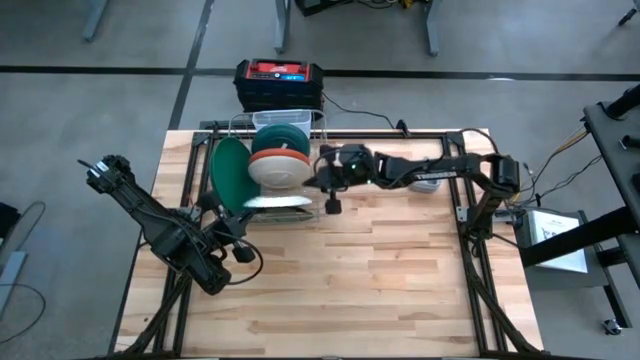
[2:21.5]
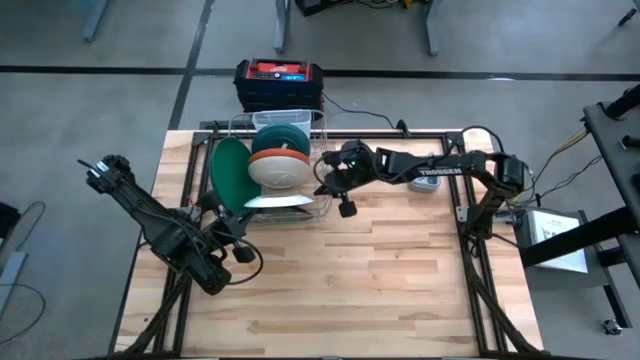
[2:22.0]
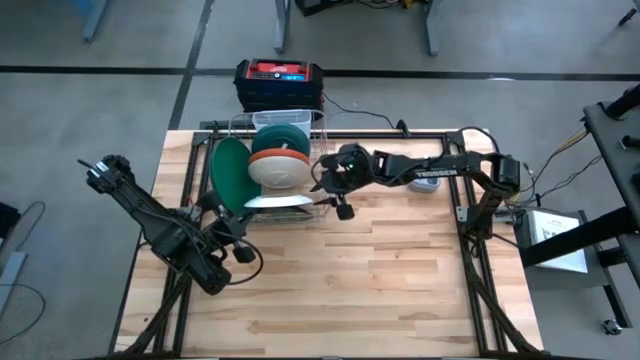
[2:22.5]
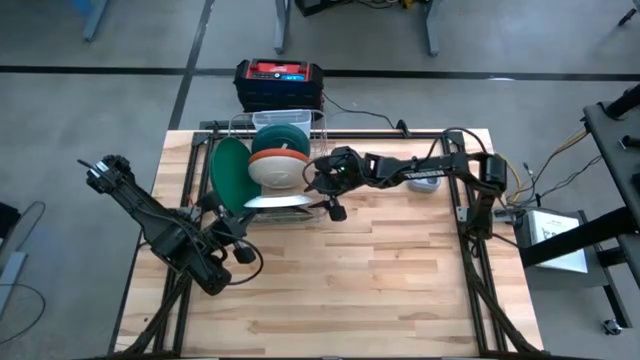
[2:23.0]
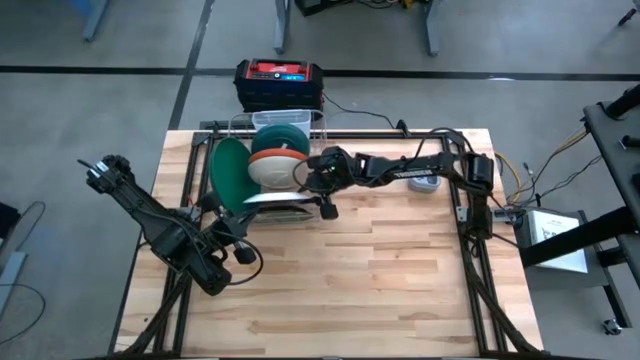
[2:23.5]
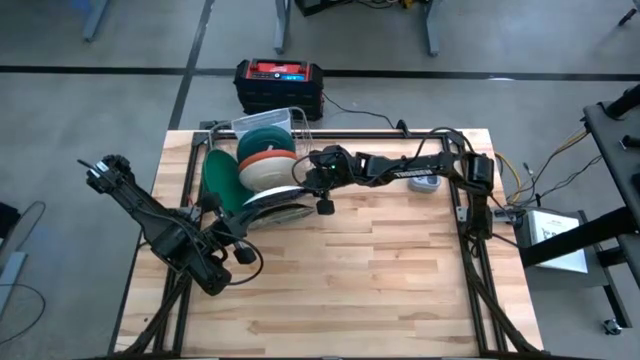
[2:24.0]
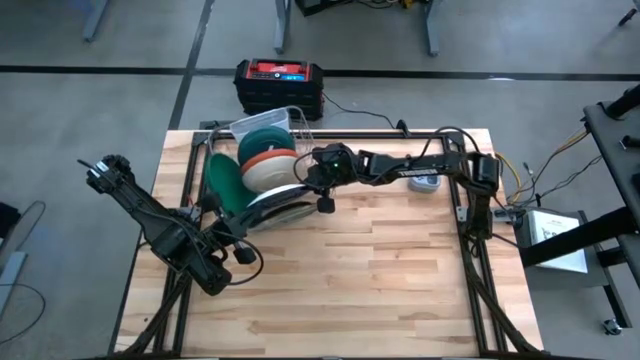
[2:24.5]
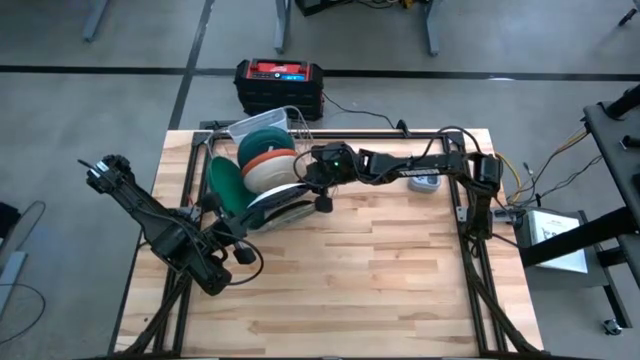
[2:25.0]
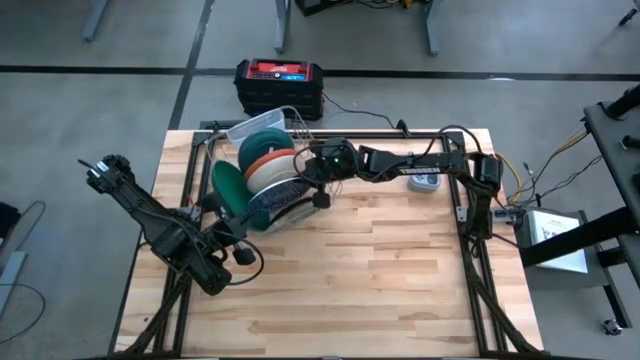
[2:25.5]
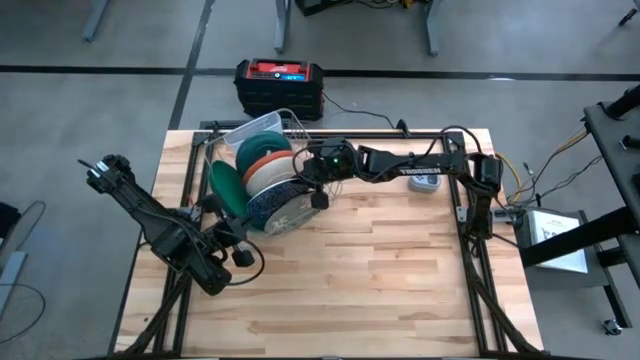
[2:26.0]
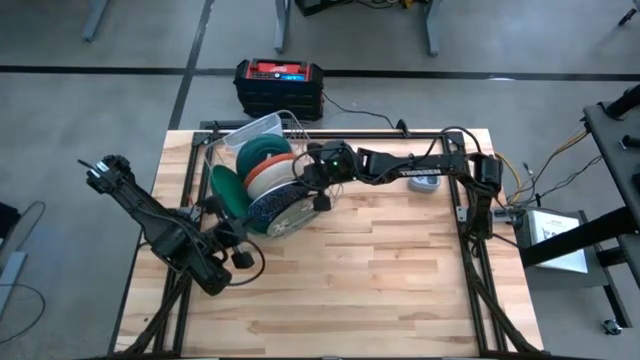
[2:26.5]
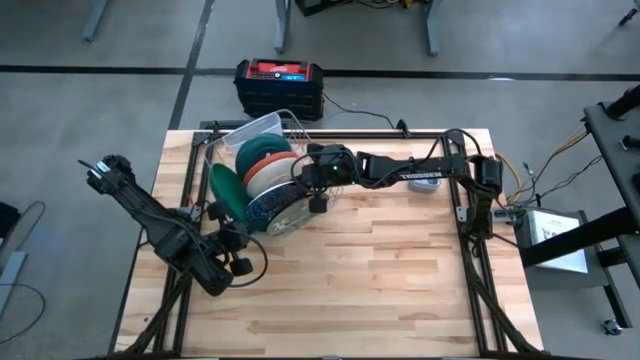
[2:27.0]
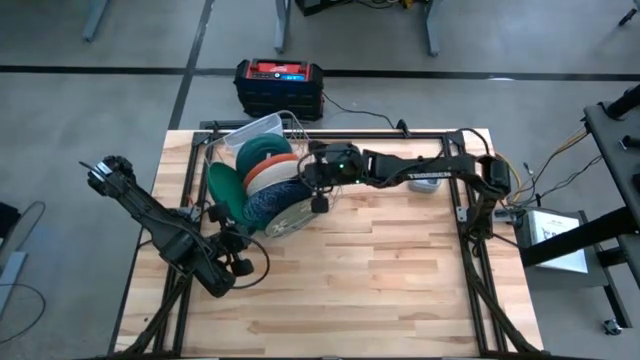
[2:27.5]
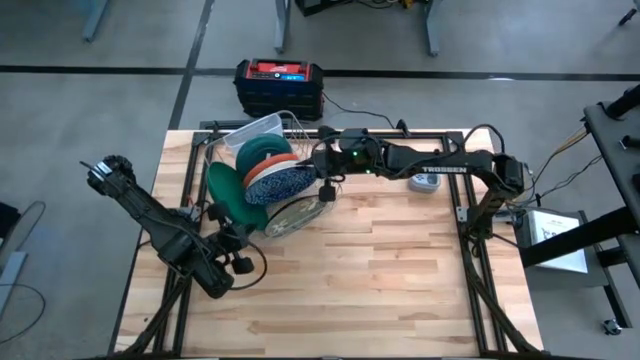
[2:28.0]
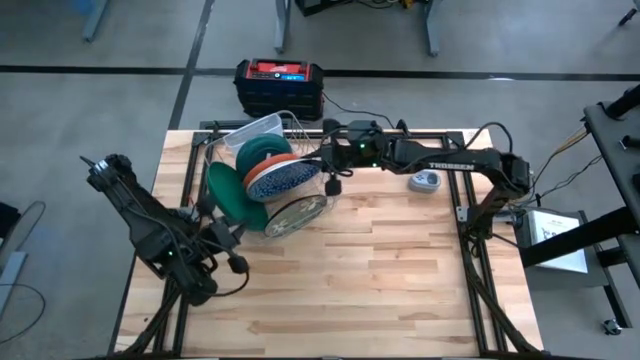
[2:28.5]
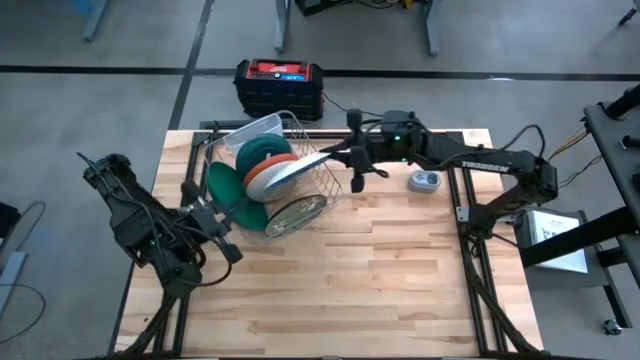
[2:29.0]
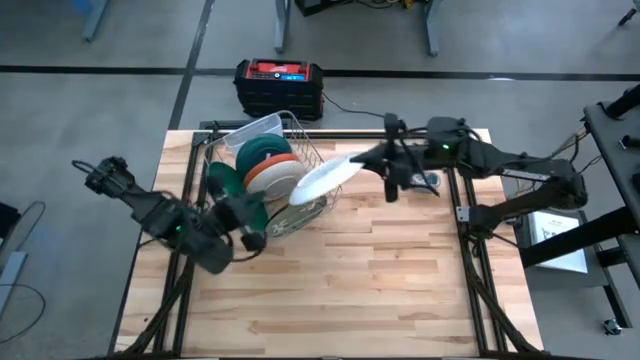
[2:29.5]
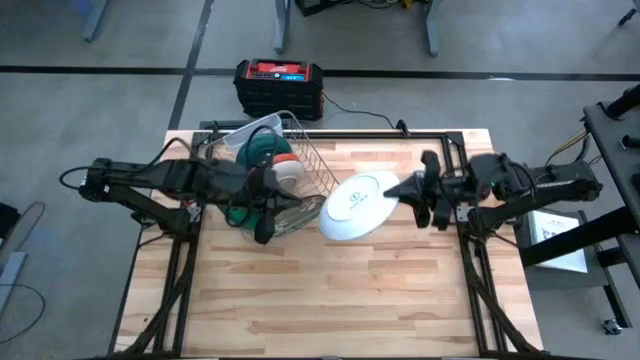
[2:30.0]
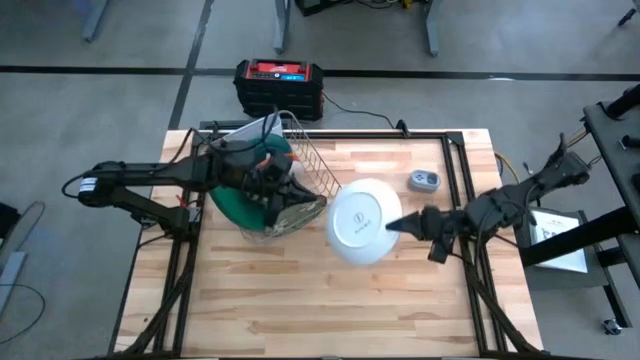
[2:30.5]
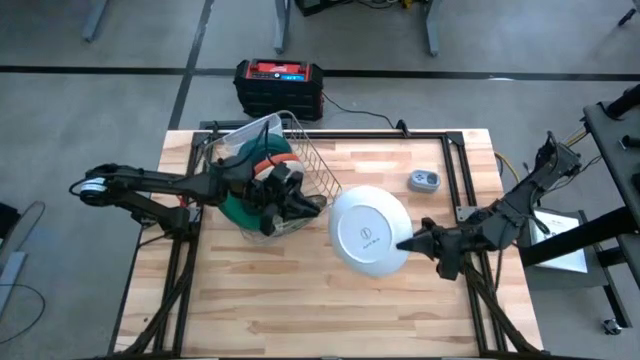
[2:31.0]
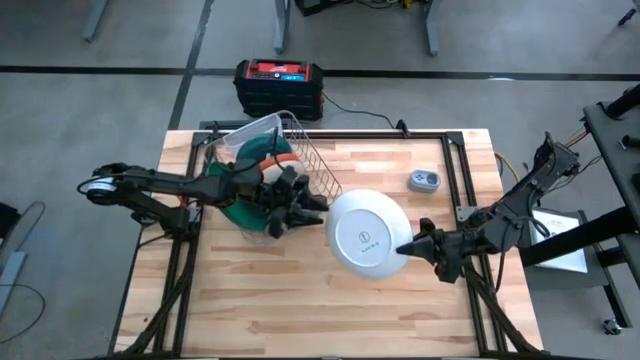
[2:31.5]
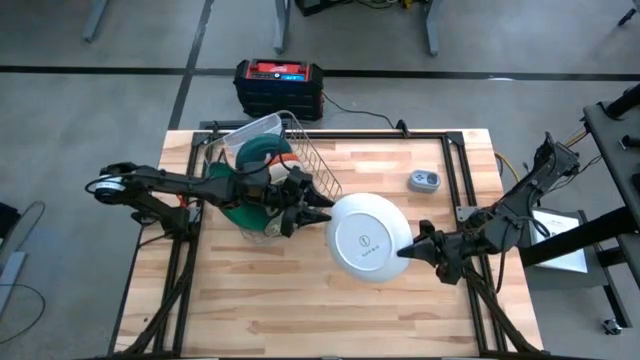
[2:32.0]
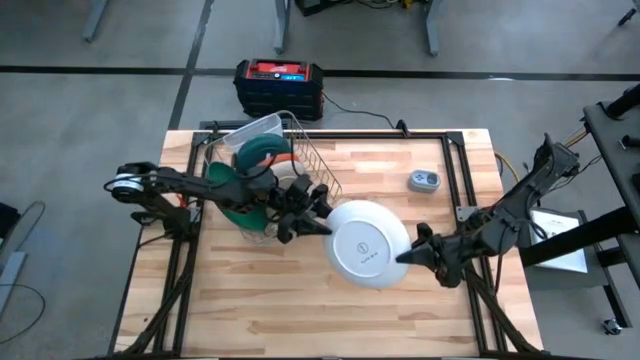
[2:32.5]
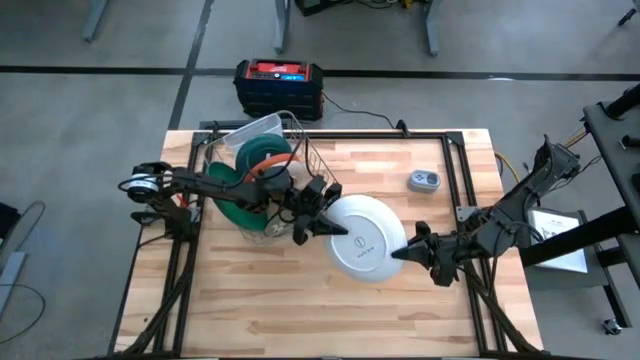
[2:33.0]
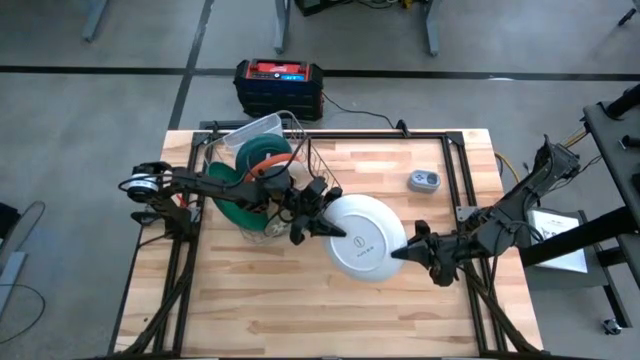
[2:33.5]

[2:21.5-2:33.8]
Task: Sort dishes
Adjust the blue ceramic plate into the dish rack

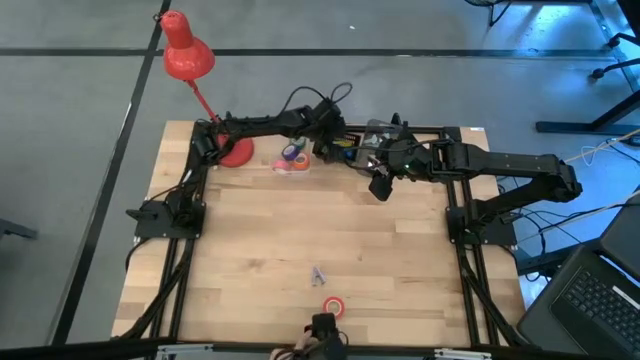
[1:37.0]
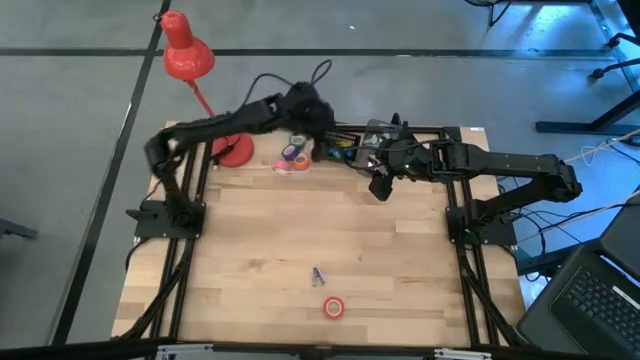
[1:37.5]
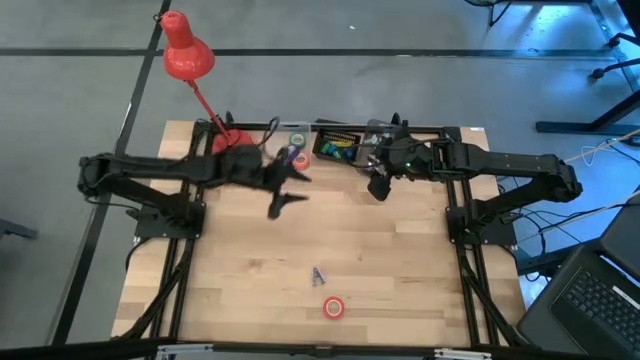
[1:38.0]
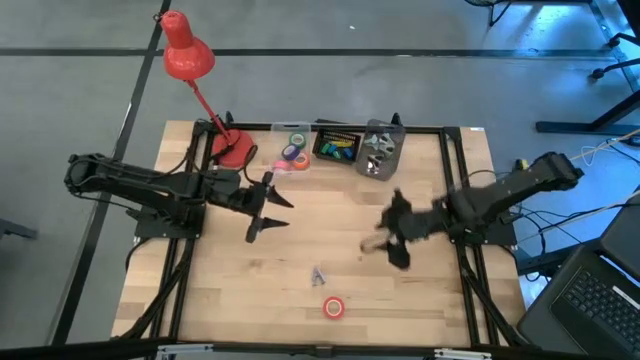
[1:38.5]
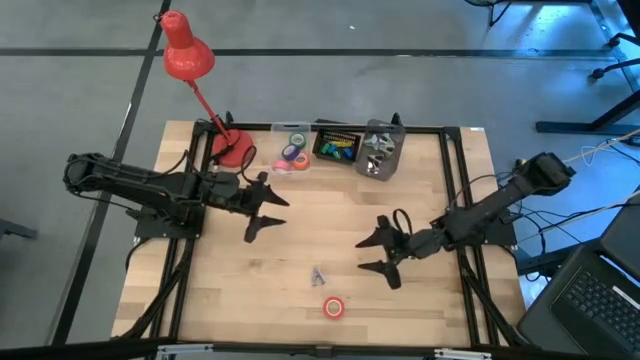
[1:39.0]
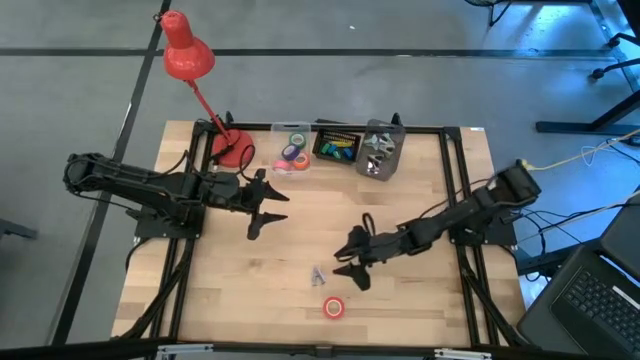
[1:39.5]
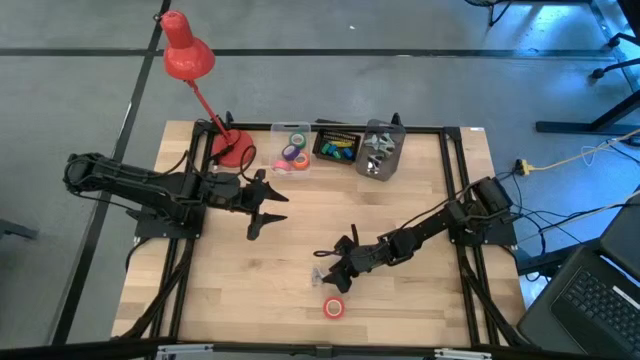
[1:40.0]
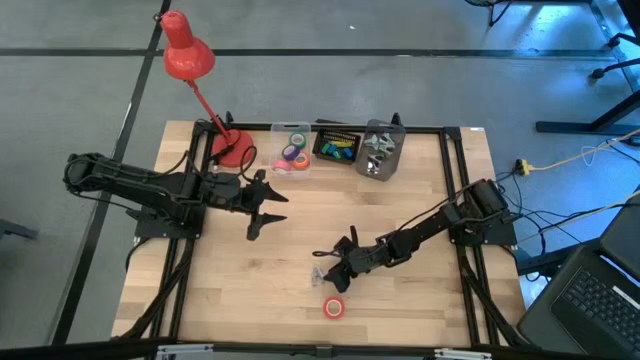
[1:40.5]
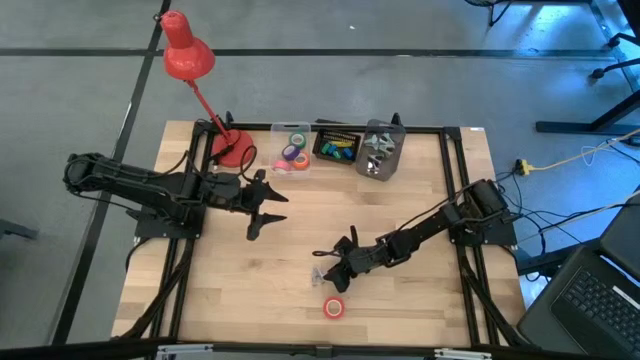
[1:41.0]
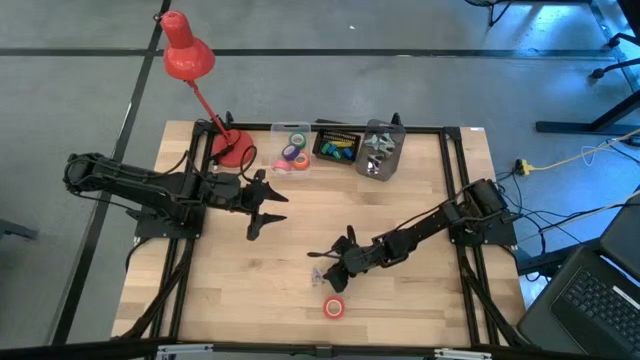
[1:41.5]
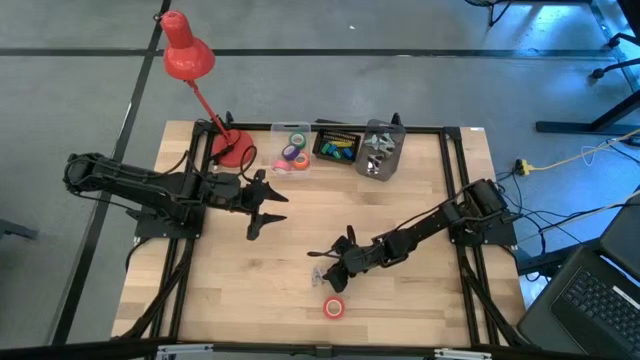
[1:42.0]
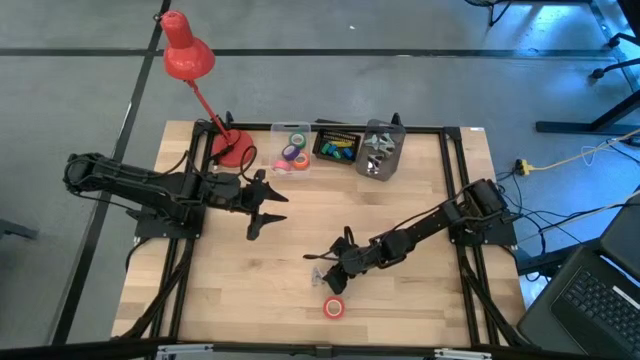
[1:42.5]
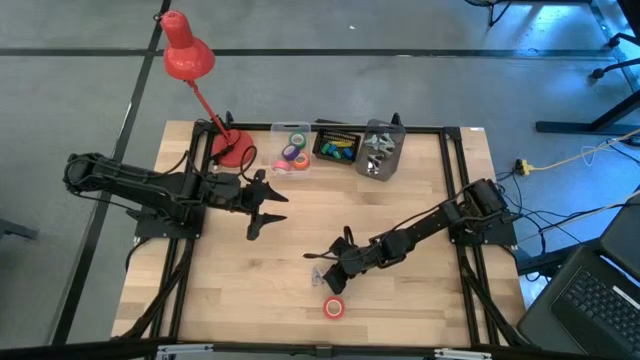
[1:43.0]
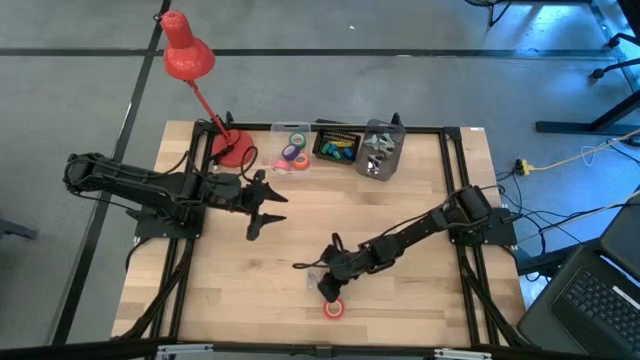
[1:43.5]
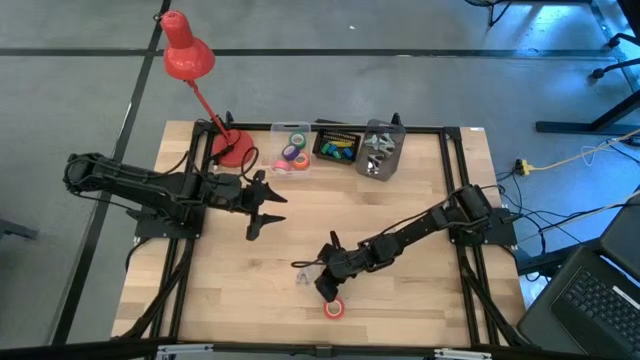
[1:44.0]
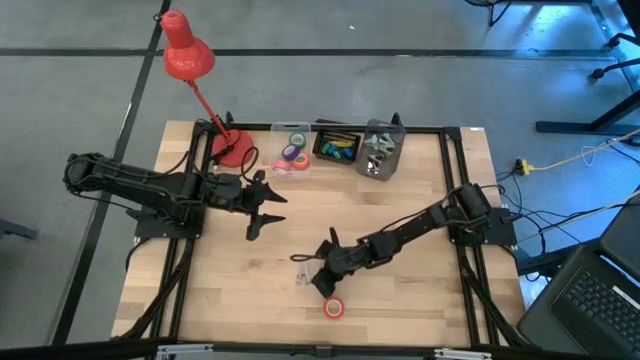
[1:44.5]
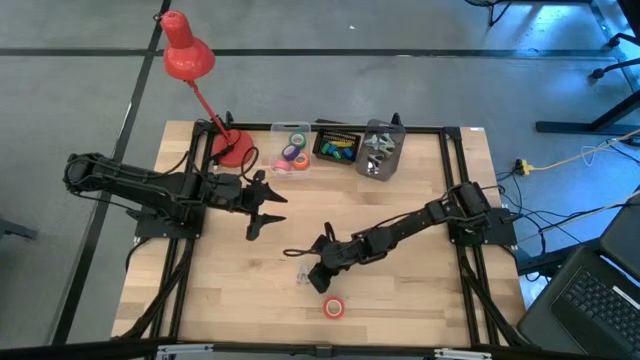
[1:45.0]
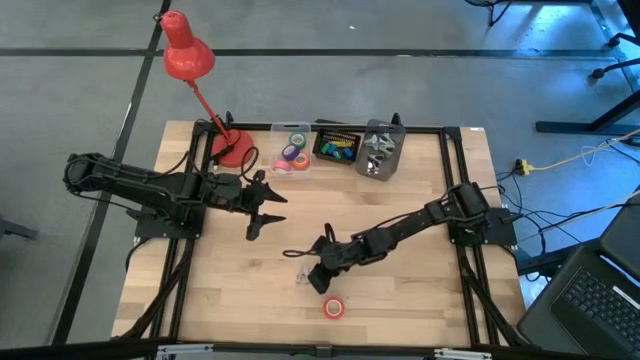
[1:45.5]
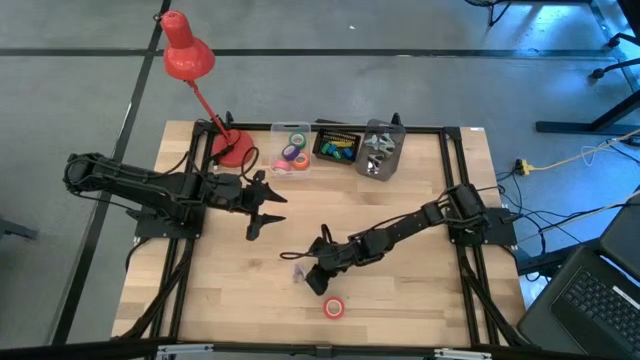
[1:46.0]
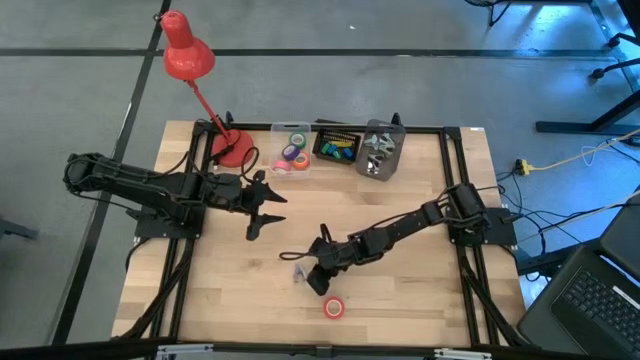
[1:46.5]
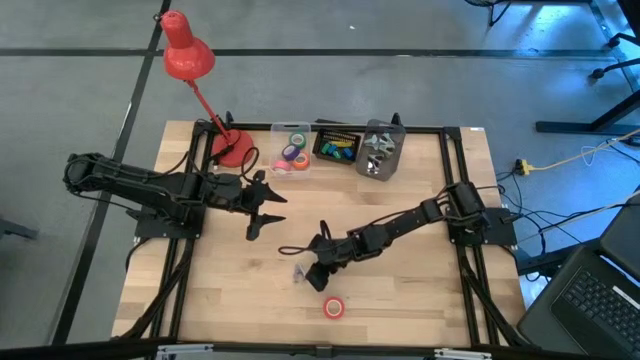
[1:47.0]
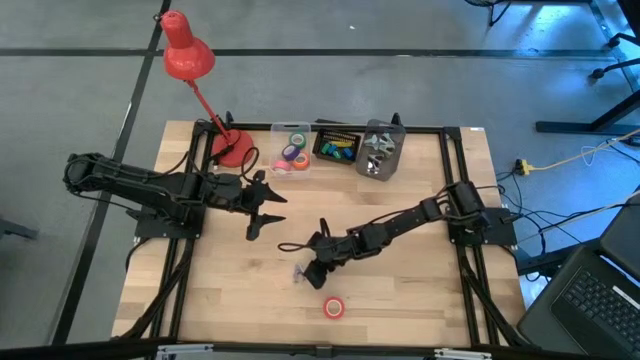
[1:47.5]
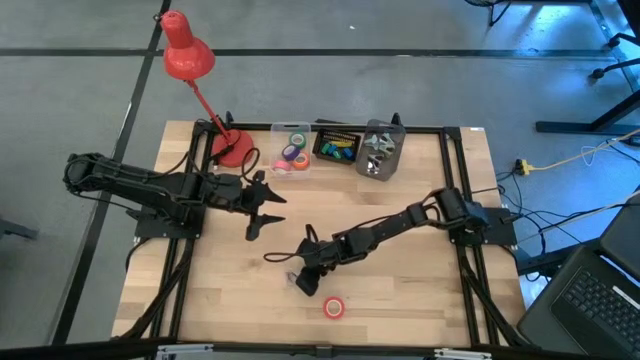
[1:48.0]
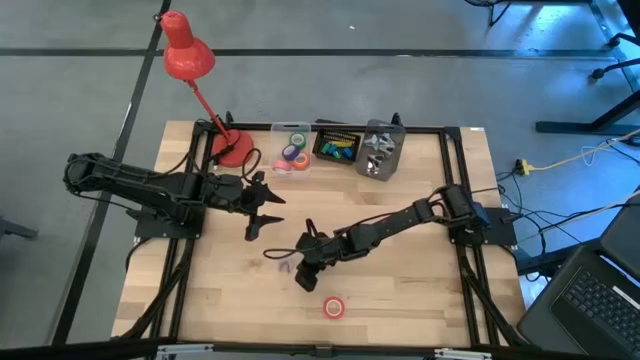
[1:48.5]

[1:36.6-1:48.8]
Task: Pick and place Stapler, Stapler remover, tape
Put the purple staple remover into the right black bin
